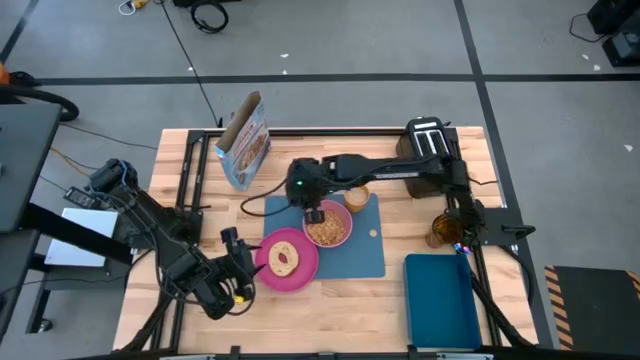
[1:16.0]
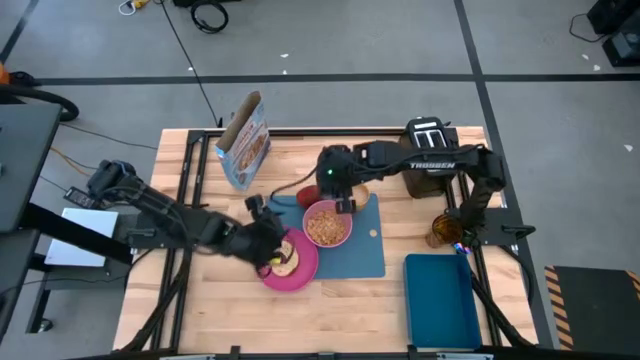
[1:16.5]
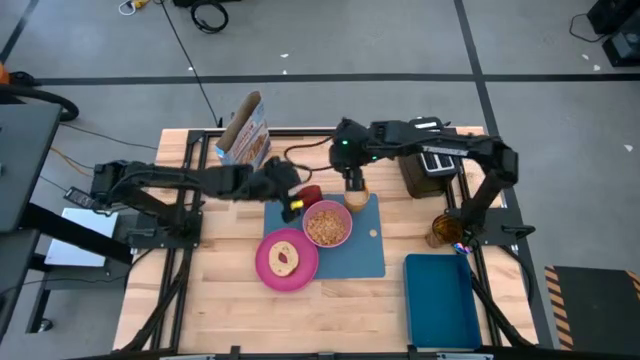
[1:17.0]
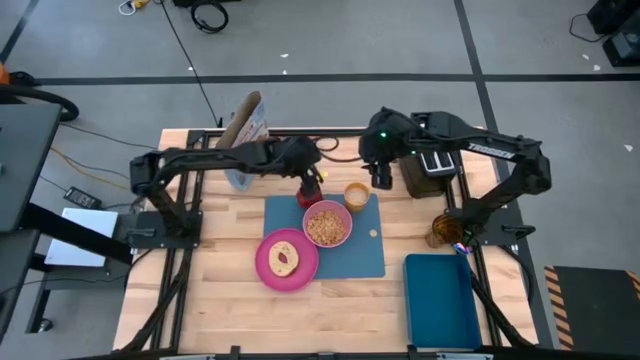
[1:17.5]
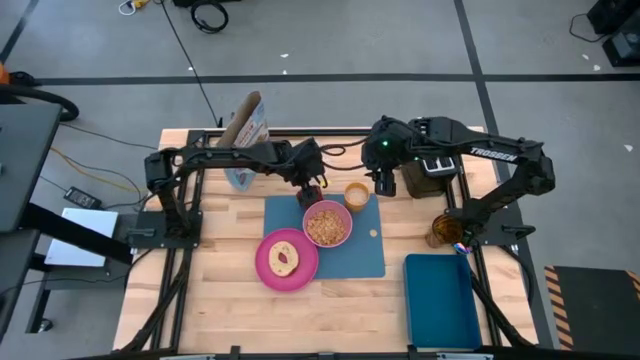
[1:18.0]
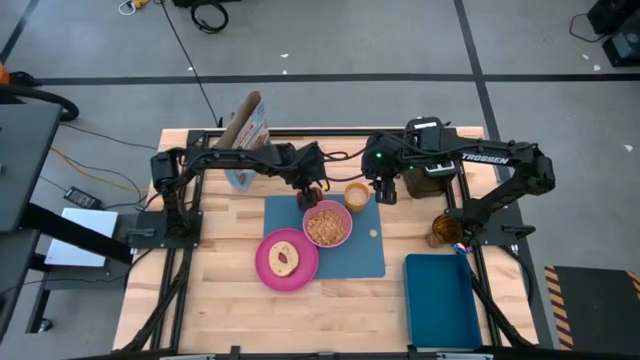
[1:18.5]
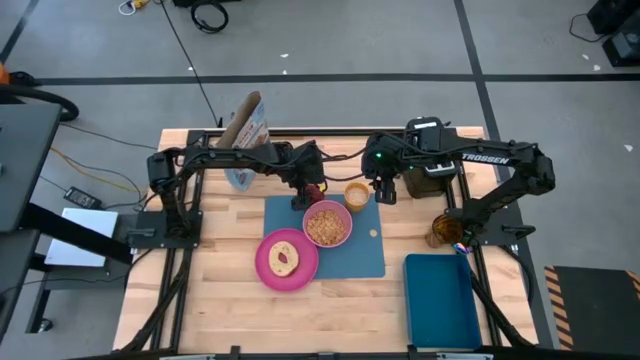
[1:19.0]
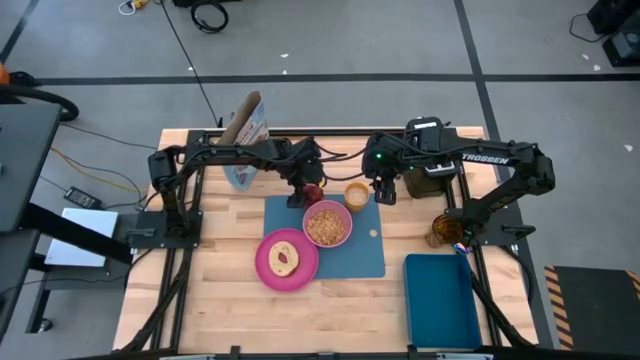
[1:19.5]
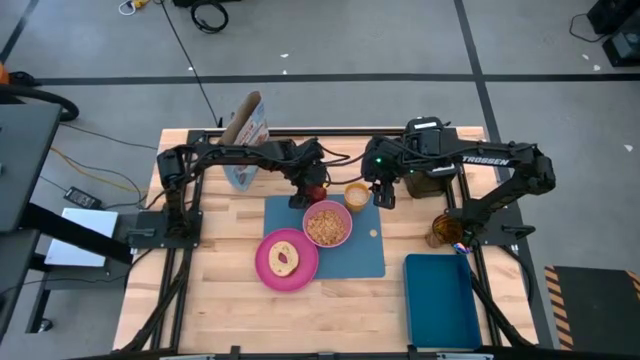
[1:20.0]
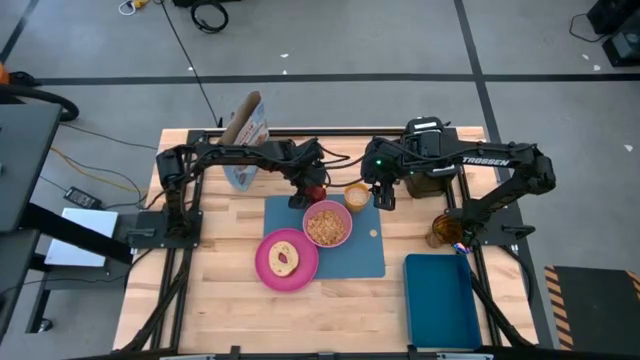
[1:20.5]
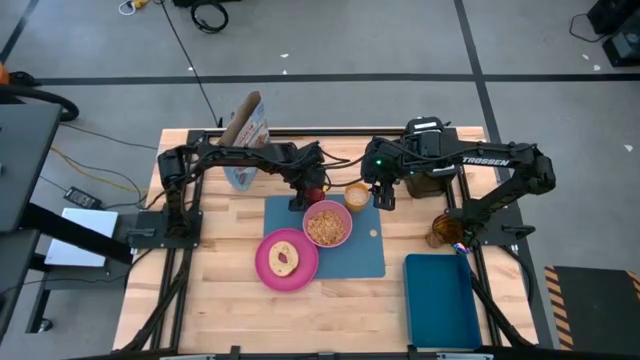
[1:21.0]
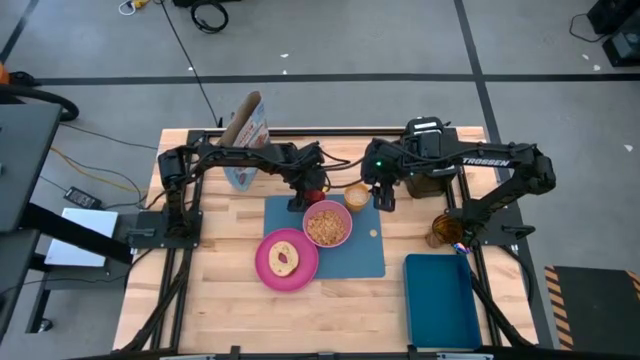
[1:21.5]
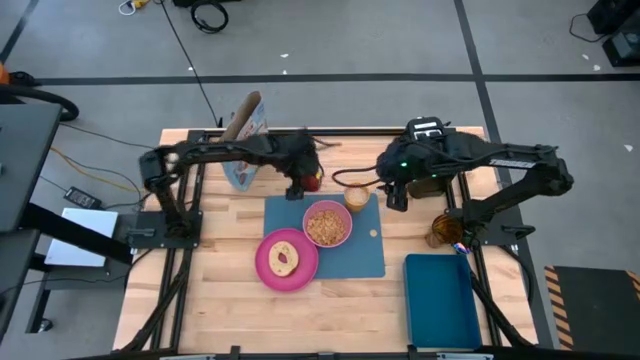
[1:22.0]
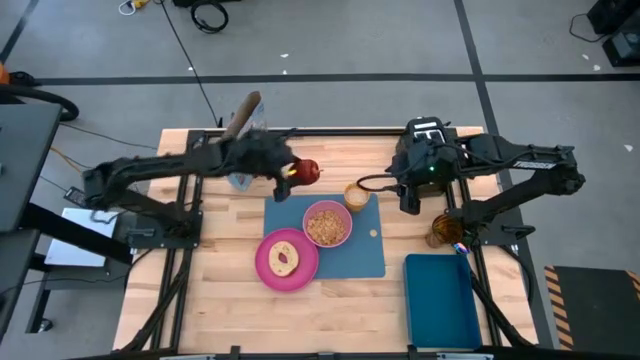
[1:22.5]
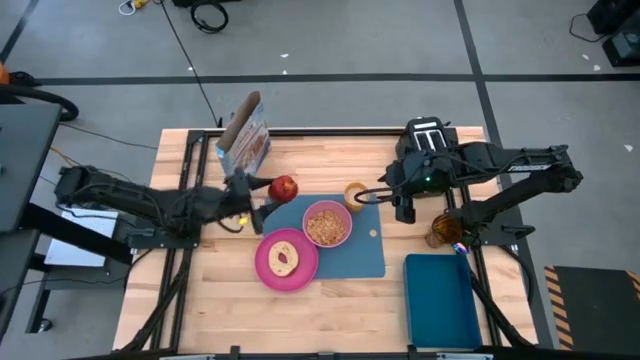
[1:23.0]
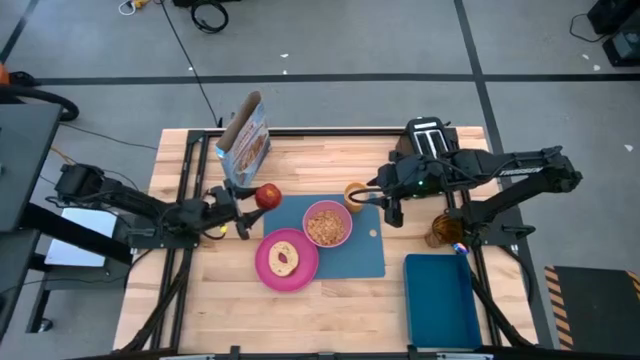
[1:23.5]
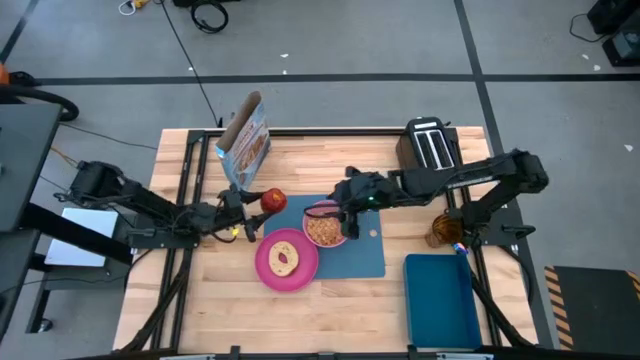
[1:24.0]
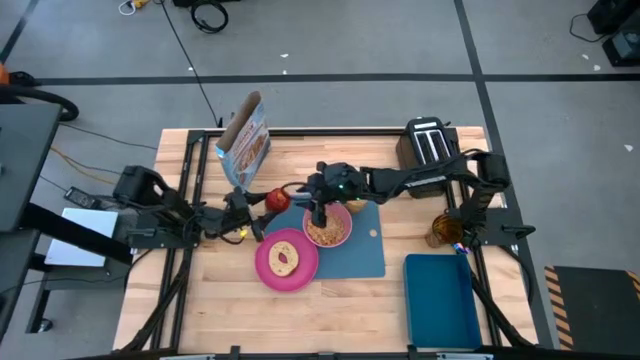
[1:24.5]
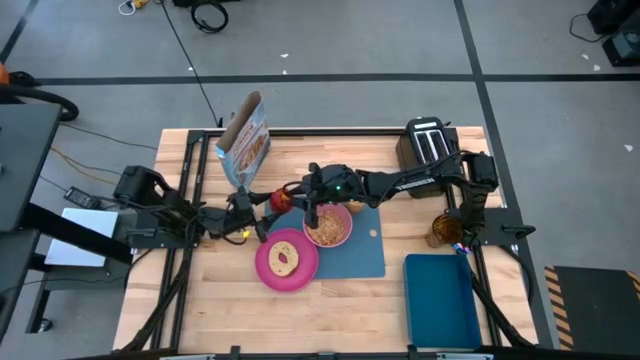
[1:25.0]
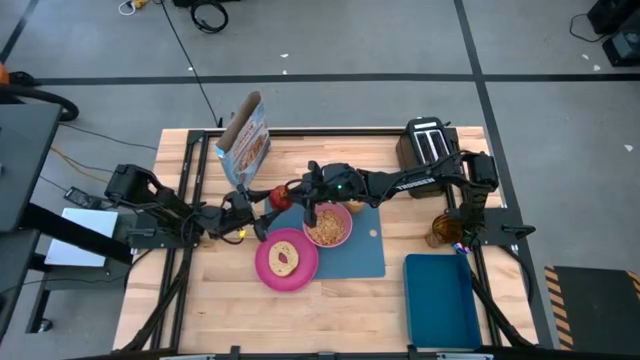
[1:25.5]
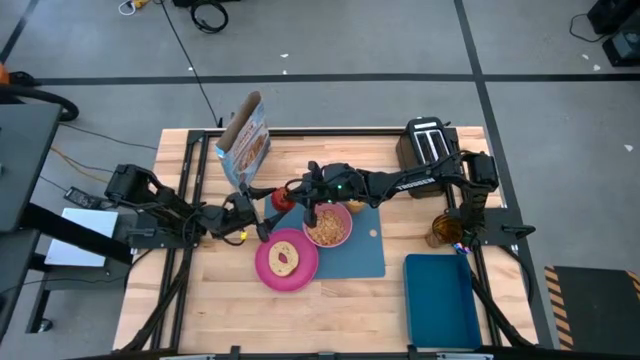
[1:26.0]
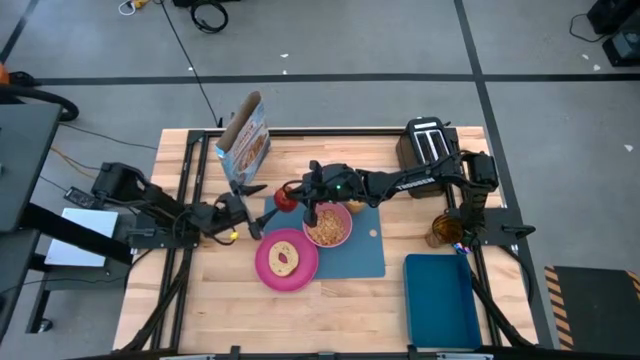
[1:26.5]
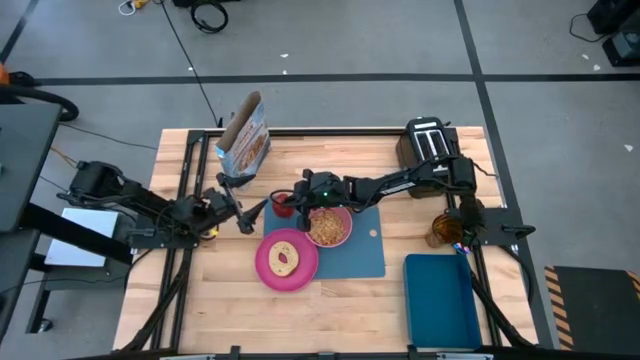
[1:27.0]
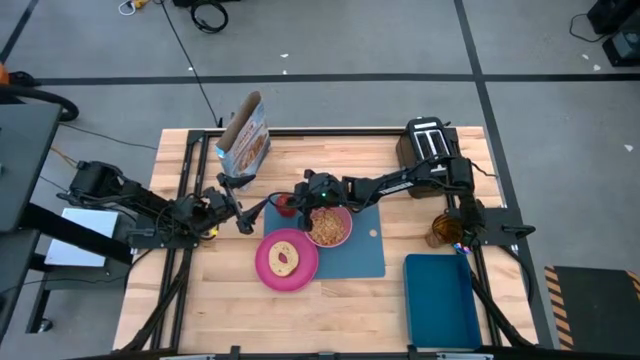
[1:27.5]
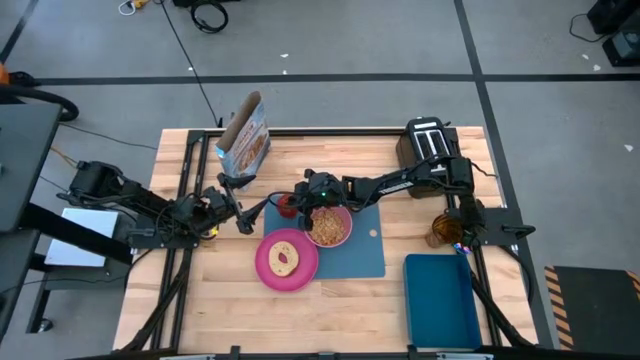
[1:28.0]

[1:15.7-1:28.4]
Task: Arrange a breakfast setting
Put the red apple on the blue placemat above the pink bowl

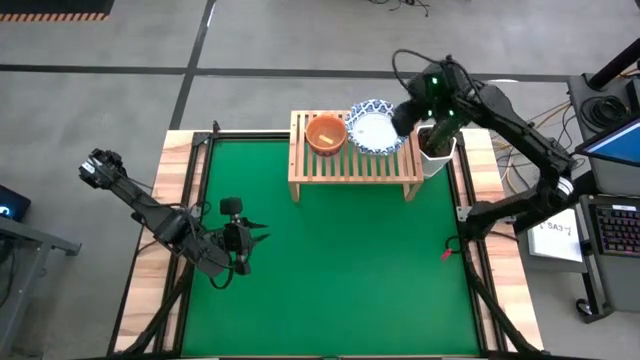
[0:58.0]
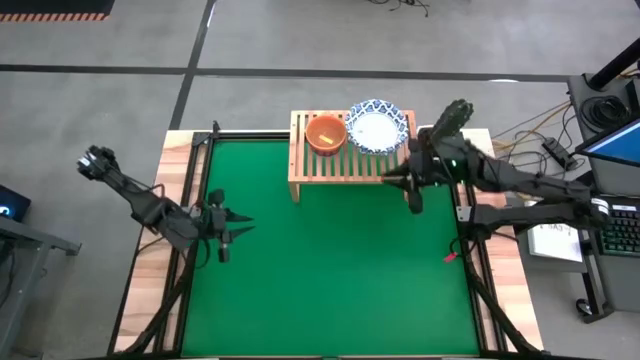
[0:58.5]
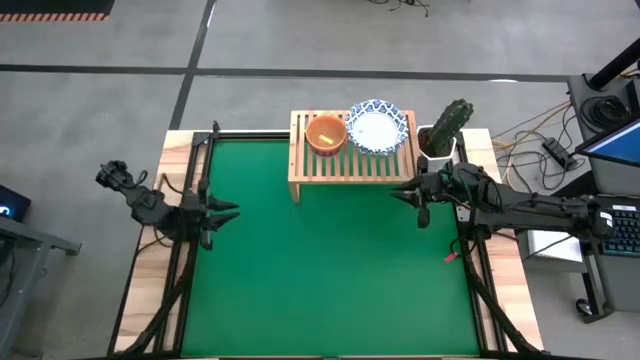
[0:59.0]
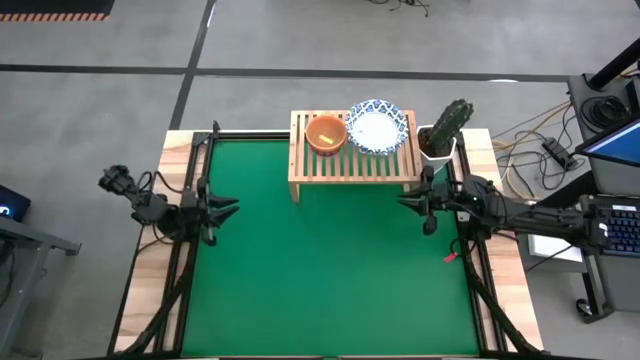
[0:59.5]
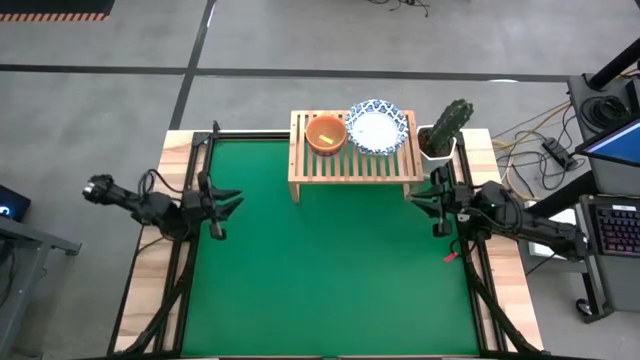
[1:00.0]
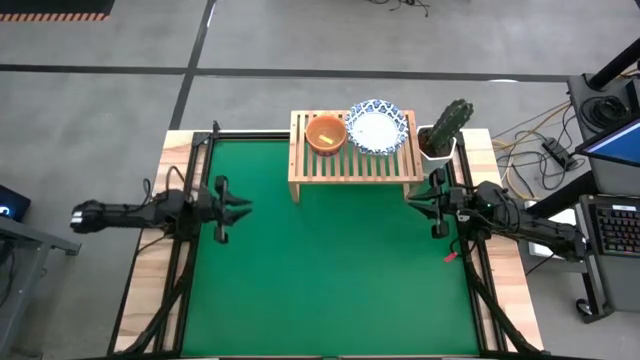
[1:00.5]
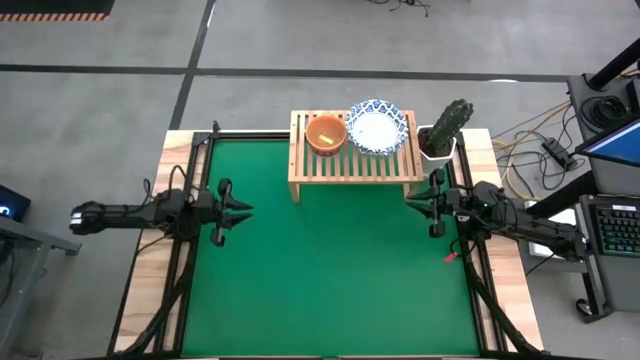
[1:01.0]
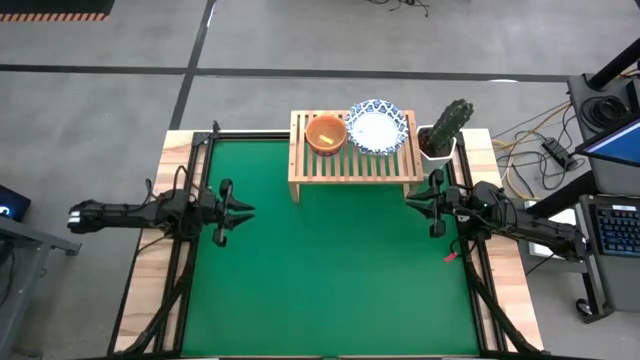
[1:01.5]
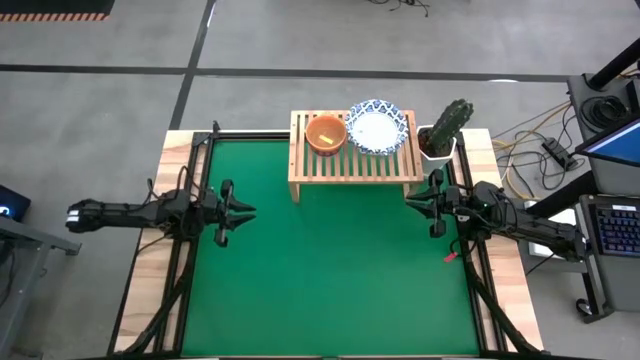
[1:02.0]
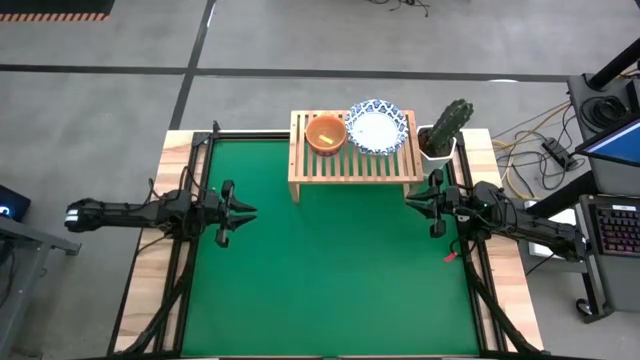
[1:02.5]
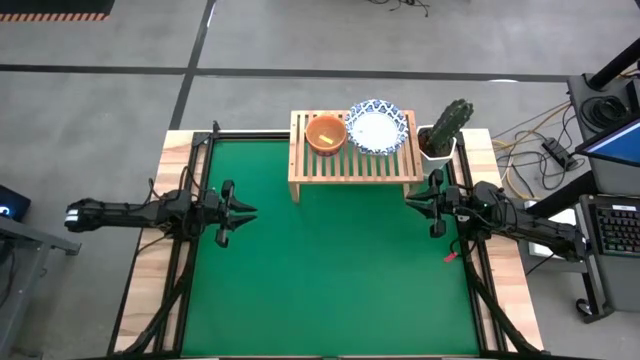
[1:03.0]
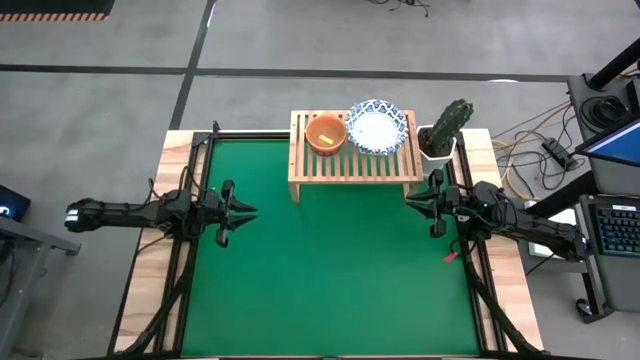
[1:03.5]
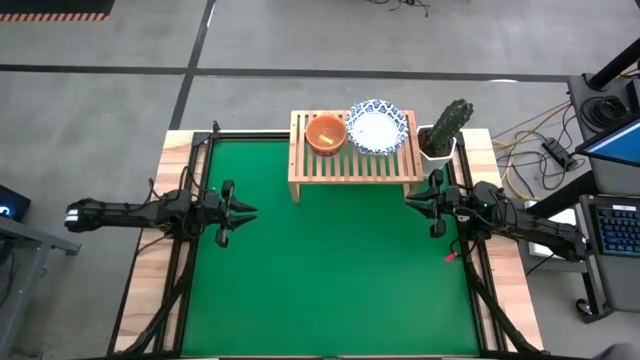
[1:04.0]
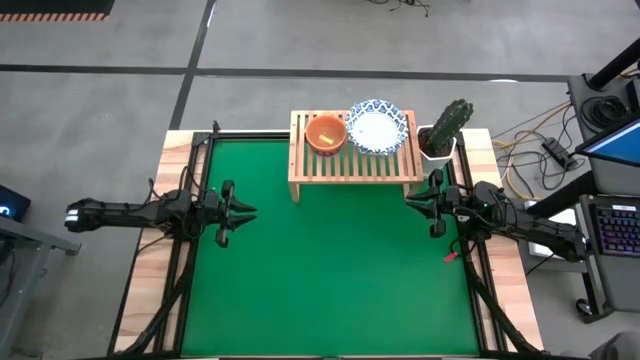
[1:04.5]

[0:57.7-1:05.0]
Task: Place and stack bowls onto a shelf
Return to Home Position

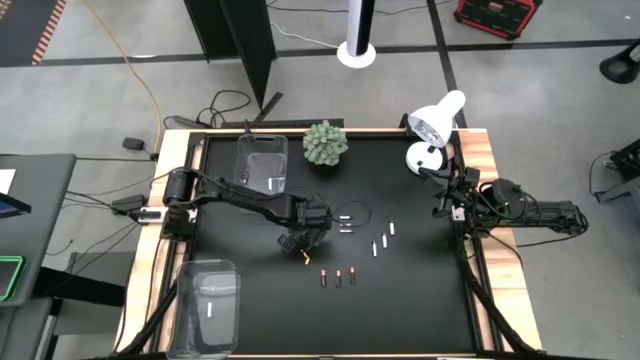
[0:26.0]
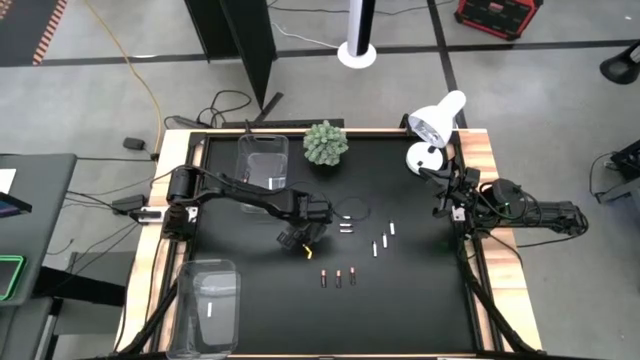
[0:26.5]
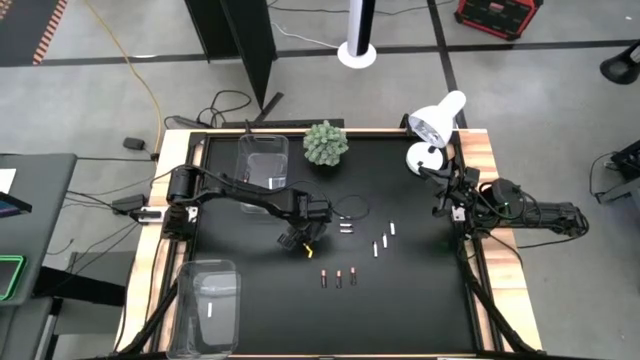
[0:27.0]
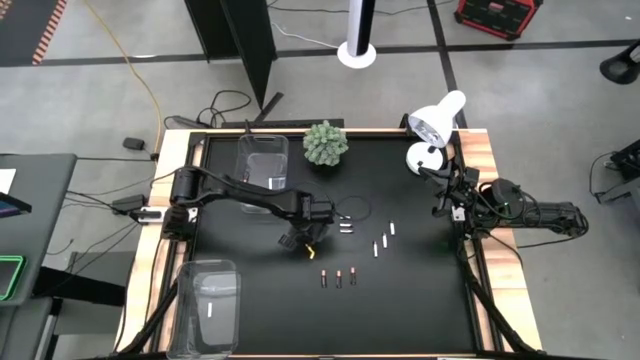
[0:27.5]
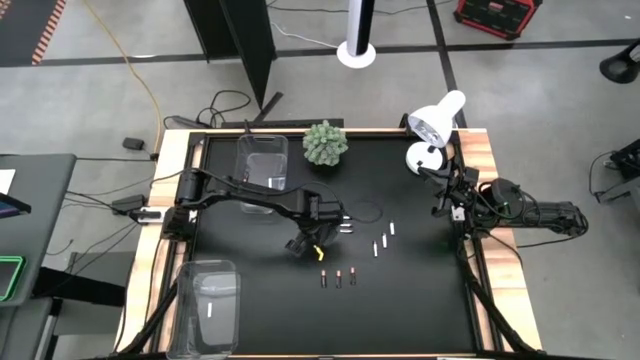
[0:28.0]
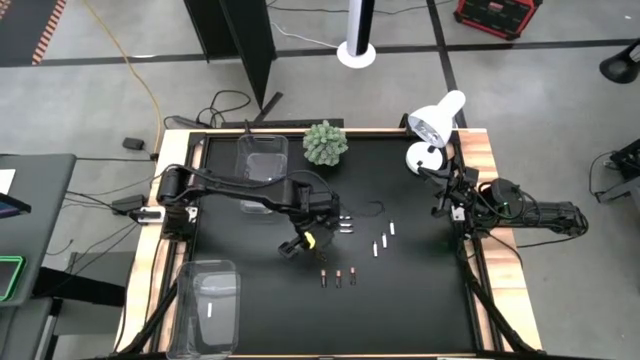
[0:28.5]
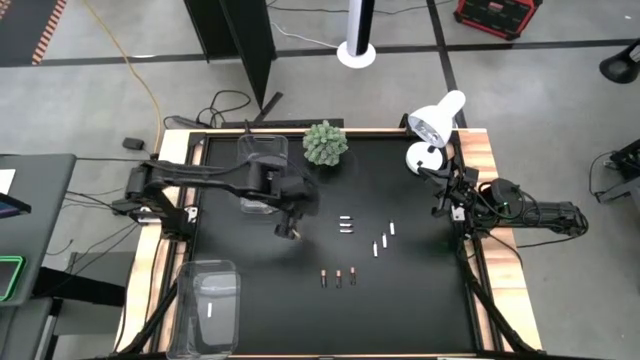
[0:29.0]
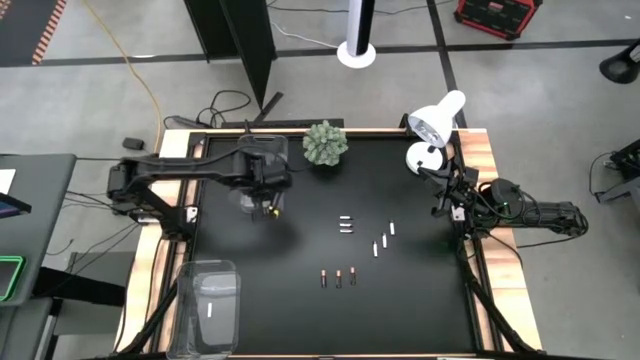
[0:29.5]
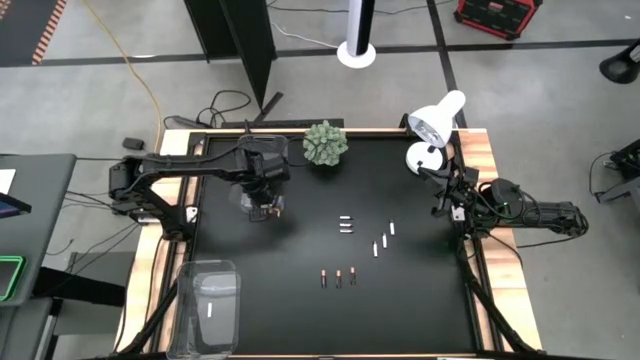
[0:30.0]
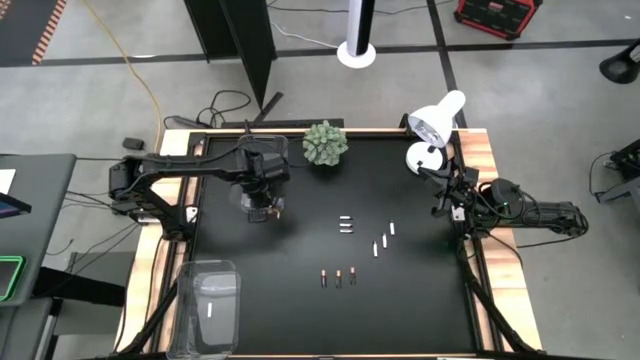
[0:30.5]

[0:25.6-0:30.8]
Task: Sort batteries
Put the copper and black battery into the top transparent bin
